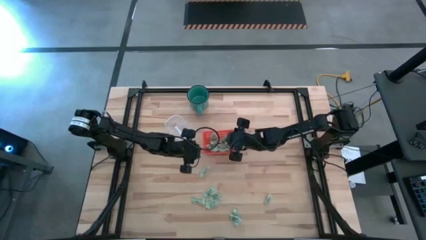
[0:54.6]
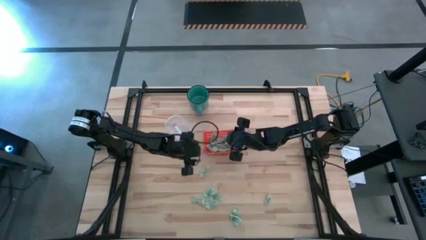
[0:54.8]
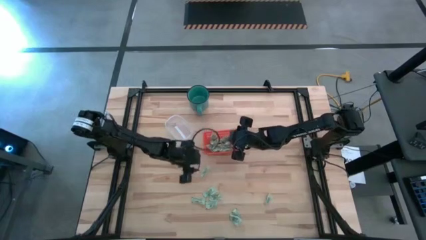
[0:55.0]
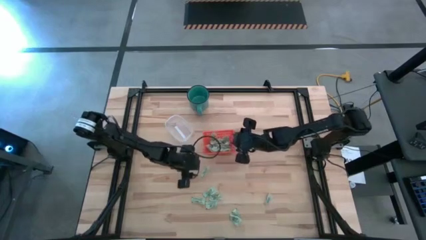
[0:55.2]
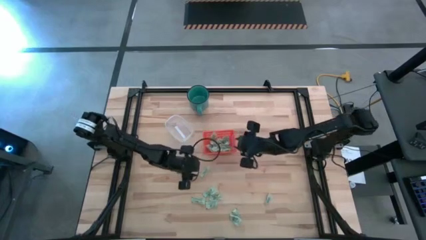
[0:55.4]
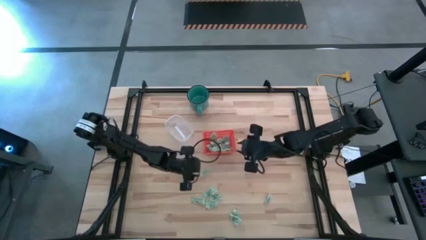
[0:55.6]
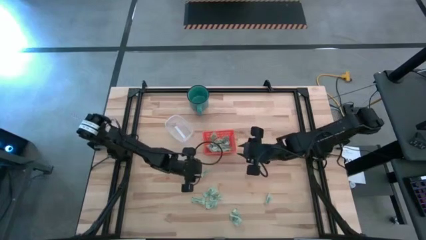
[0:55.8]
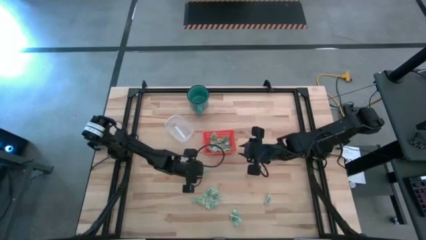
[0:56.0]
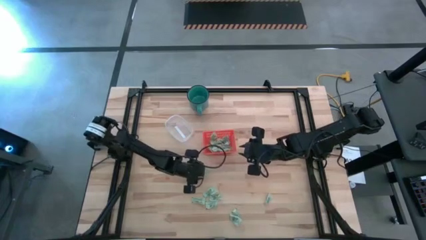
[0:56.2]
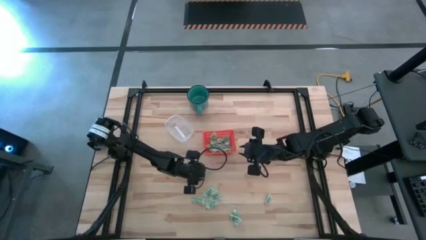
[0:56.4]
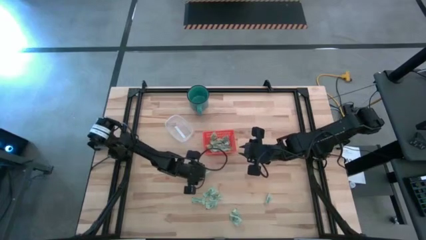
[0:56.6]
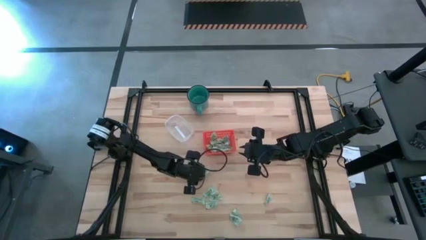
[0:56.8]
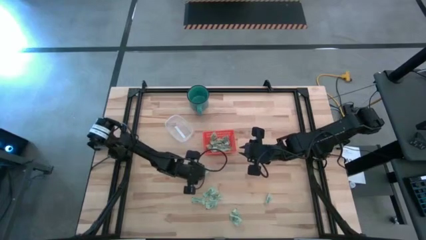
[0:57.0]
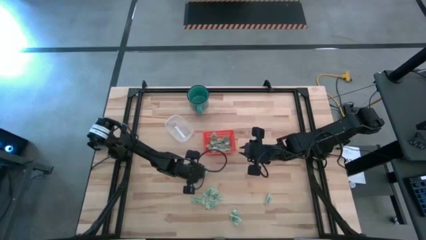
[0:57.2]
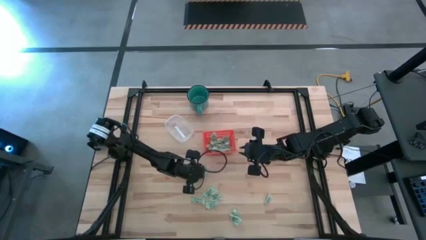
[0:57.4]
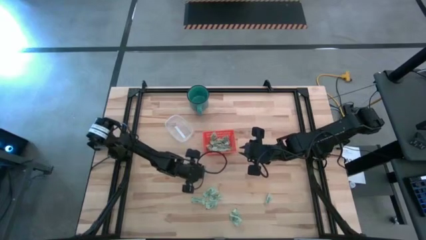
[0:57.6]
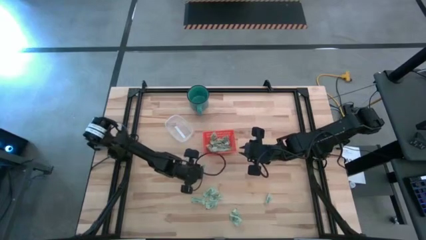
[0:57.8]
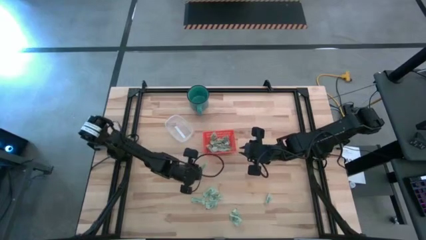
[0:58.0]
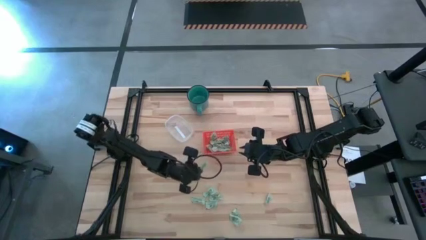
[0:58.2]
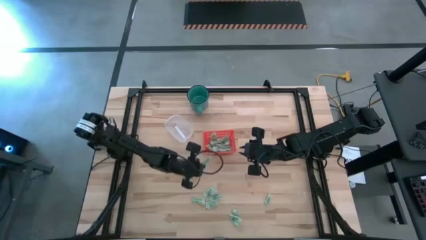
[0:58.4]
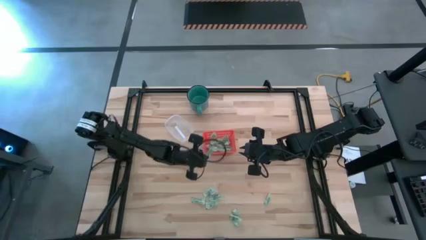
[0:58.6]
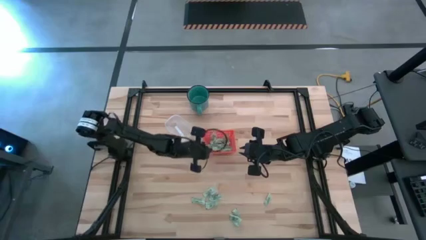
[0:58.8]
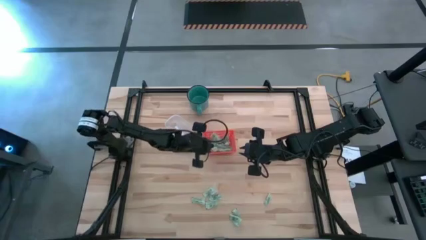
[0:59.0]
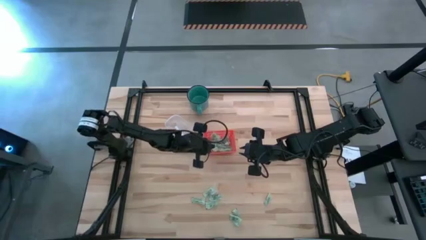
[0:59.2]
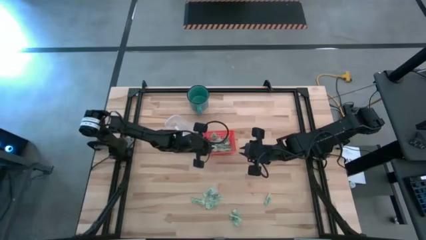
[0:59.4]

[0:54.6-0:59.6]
Task: Pick and place items into bin
Put the stevia packet into the orange bin

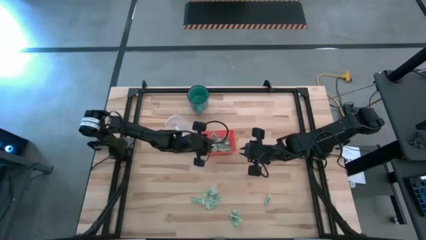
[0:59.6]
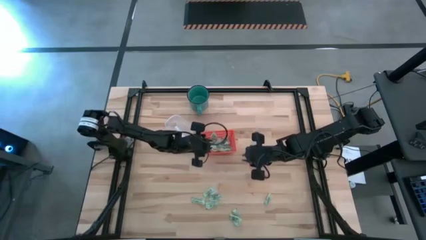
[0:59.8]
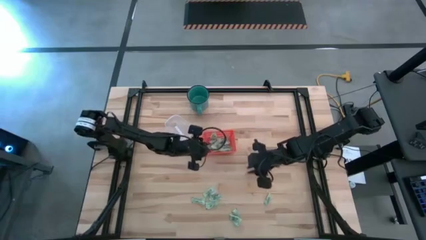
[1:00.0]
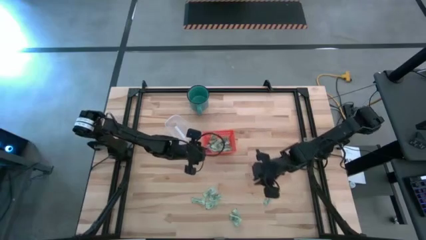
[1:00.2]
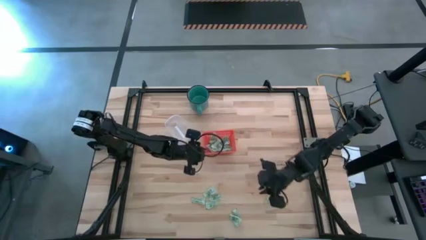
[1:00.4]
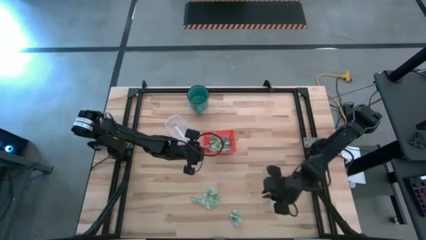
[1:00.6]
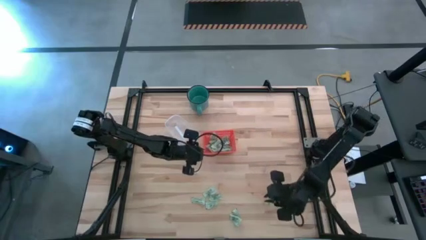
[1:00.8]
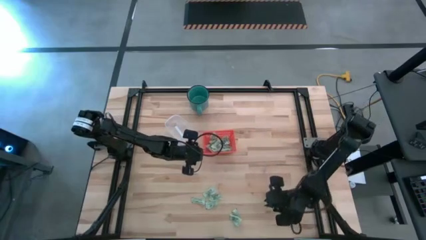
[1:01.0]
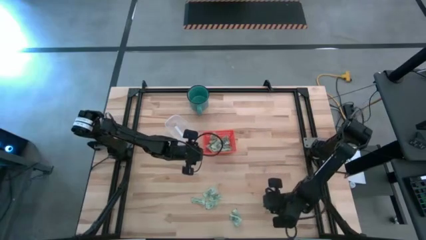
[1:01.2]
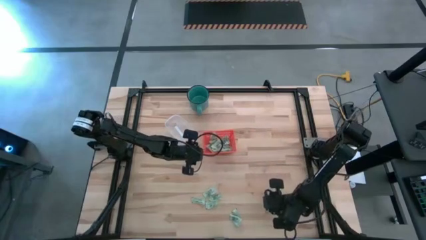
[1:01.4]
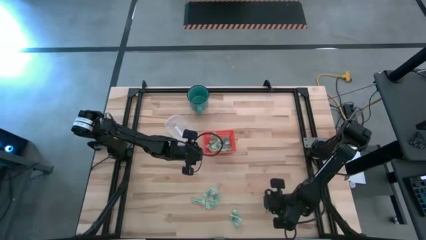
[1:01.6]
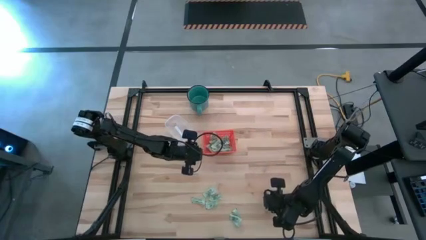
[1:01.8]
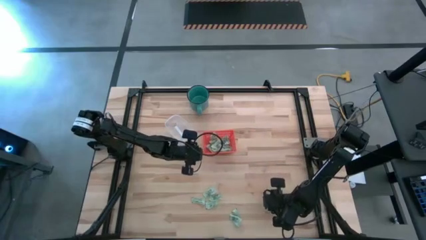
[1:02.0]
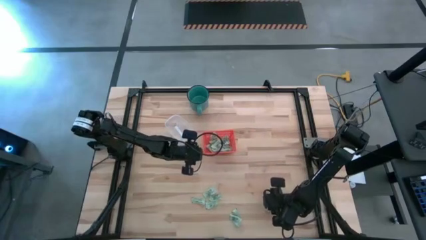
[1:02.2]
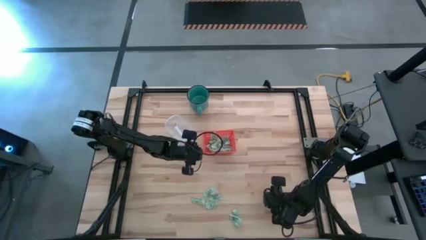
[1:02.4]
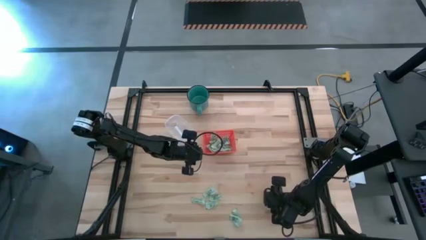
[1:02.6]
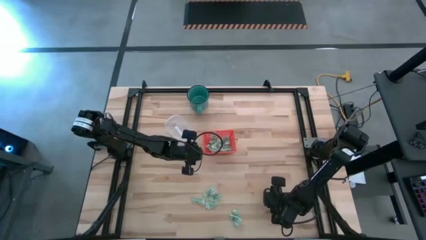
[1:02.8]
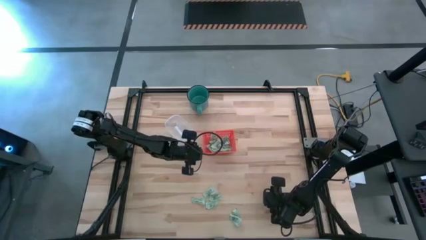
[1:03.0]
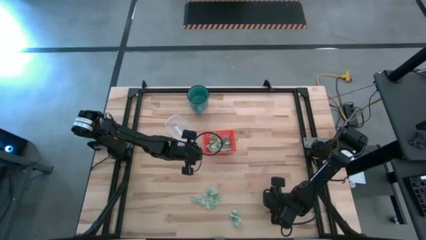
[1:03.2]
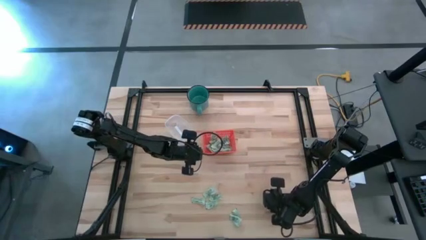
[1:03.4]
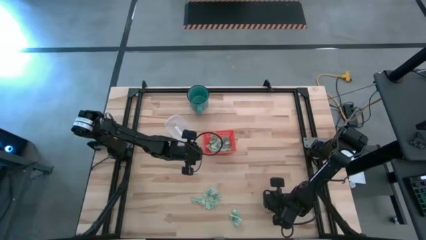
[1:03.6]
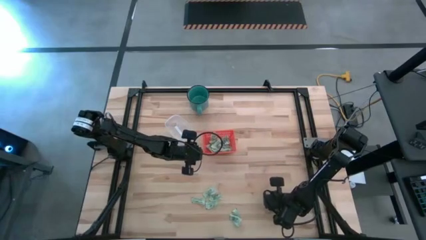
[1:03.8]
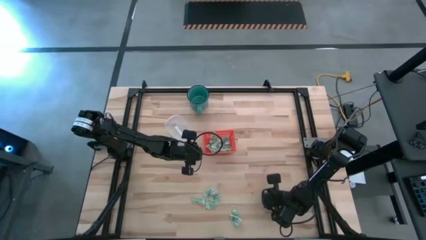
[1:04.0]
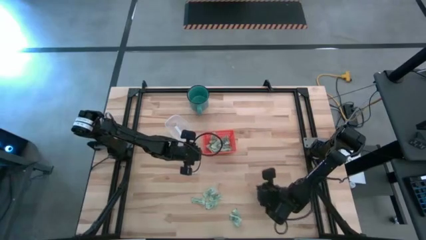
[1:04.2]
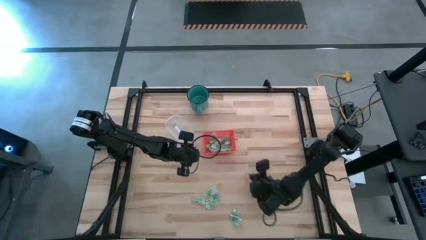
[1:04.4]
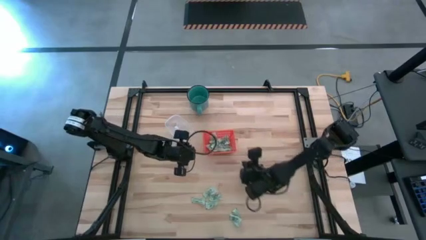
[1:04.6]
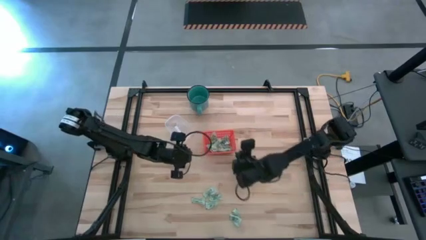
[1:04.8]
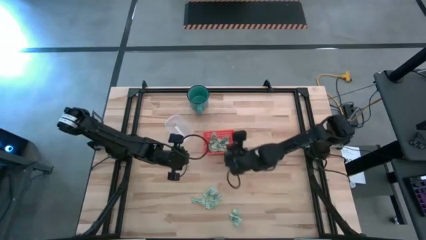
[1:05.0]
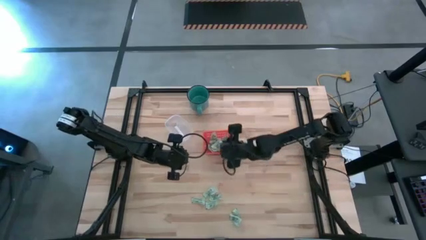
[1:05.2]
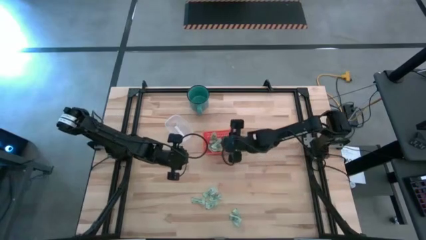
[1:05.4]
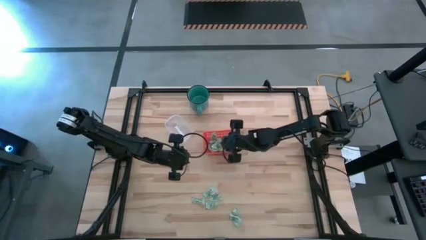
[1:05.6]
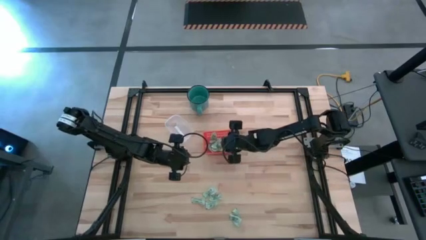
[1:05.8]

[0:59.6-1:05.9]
Put the stevia packet into the orange bin

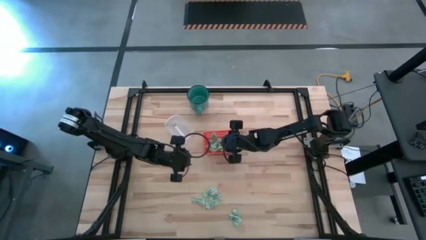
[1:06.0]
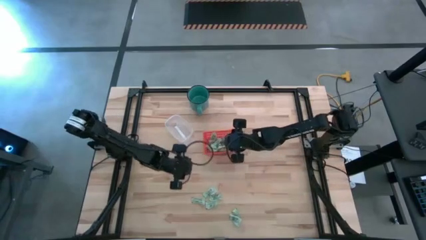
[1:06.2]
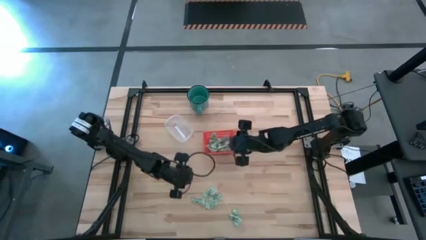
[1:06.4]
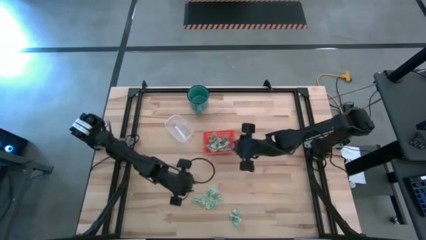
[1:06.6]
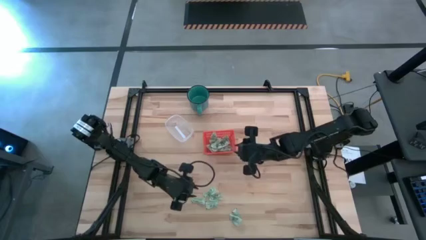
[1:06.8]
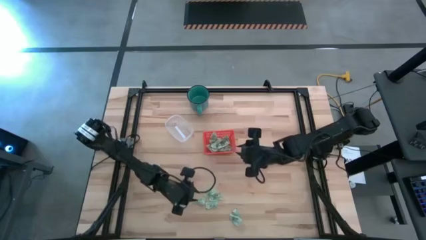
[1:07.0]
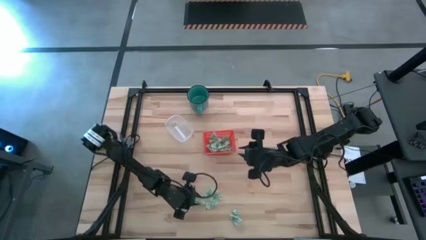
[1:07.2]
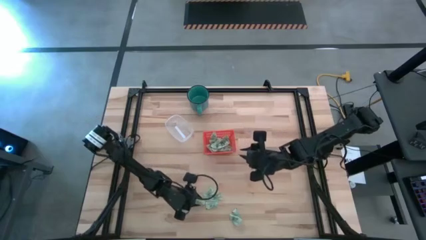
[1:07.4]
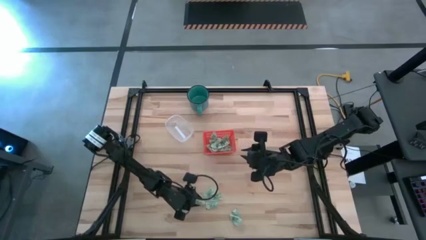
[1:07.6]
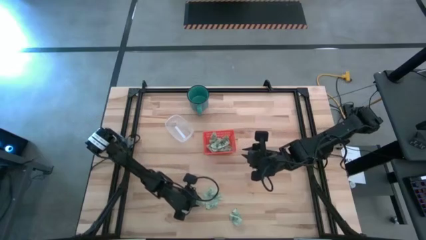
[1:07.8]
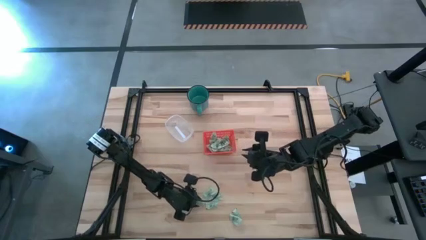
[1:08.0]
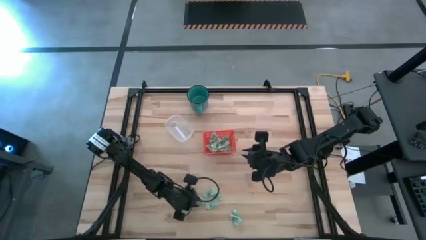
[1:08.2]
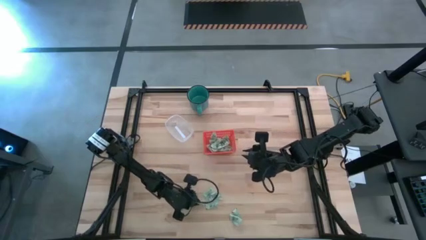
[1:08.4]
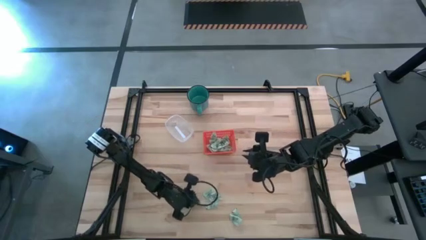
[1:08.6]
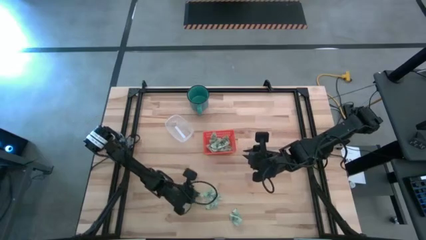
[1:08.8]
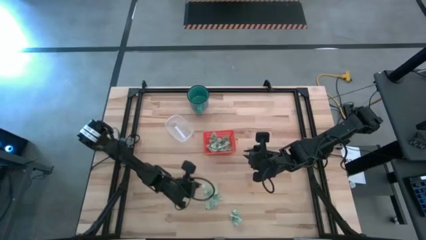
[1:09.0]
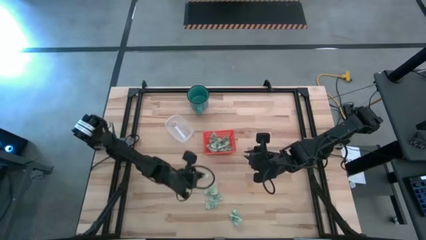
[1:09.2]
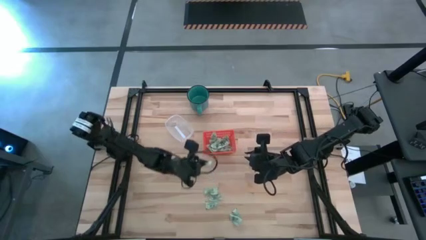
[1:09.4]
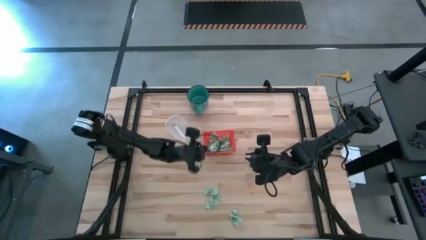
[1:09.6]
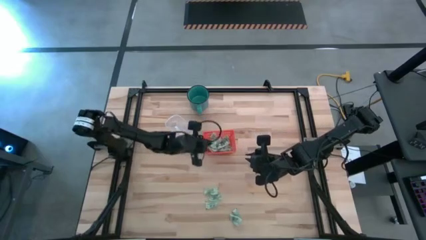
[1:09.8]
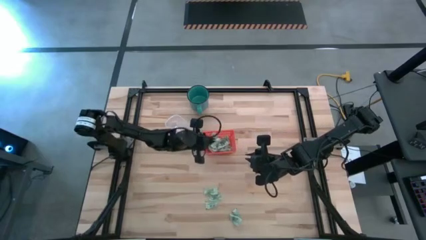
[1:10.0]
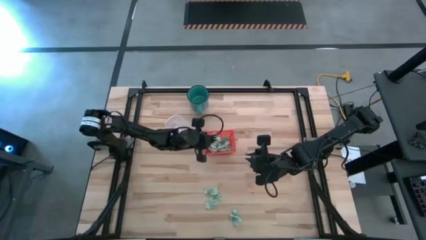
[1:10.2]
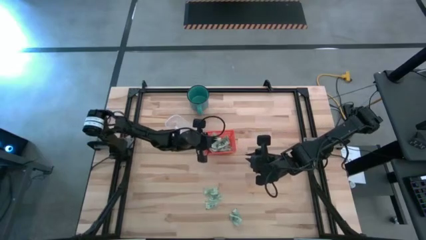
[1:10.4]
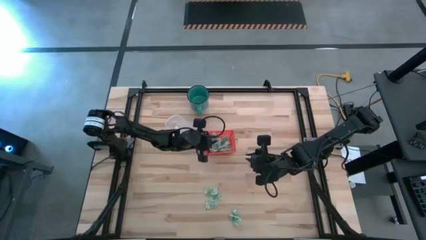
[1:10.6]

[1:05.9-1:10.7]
Put the stevia packet into the orange bin
